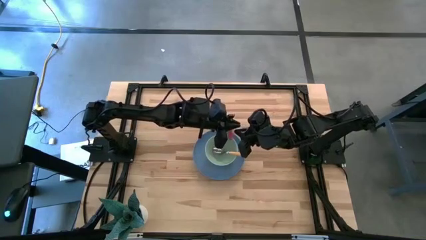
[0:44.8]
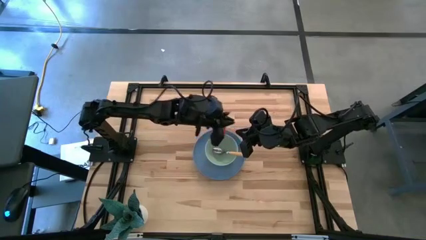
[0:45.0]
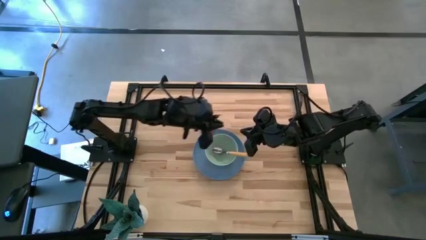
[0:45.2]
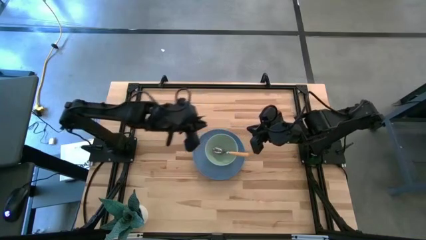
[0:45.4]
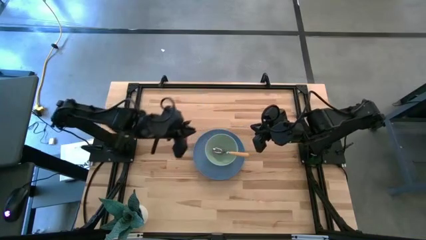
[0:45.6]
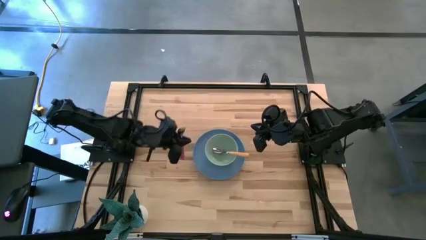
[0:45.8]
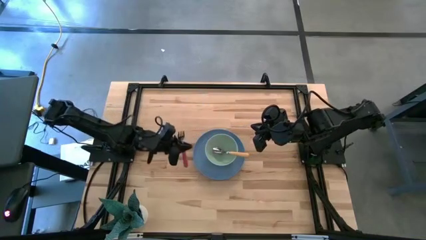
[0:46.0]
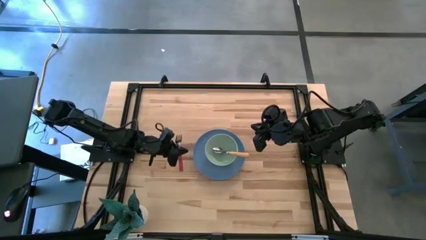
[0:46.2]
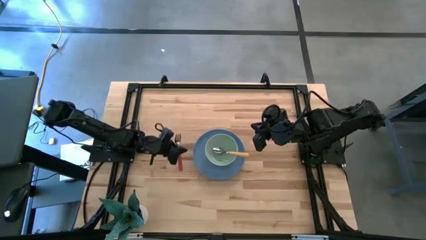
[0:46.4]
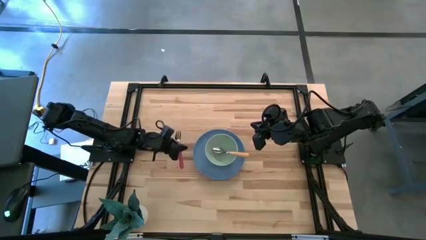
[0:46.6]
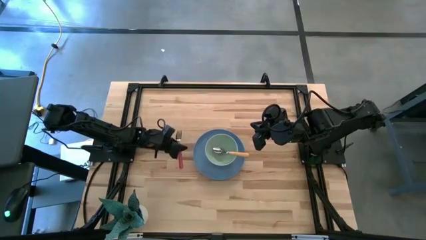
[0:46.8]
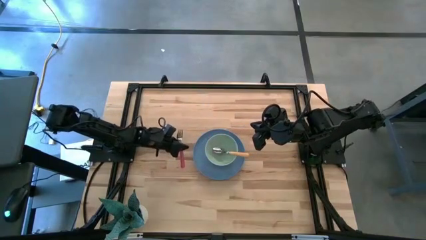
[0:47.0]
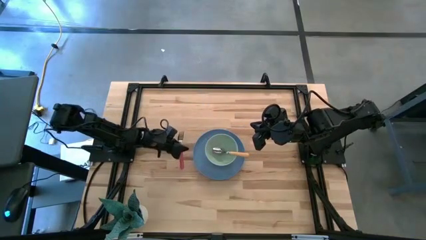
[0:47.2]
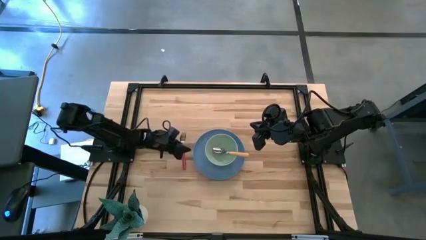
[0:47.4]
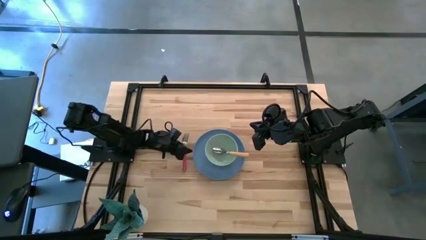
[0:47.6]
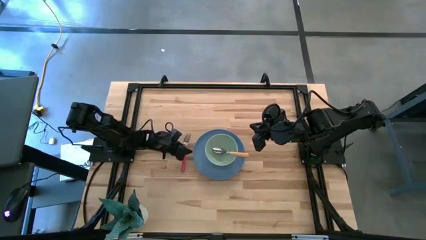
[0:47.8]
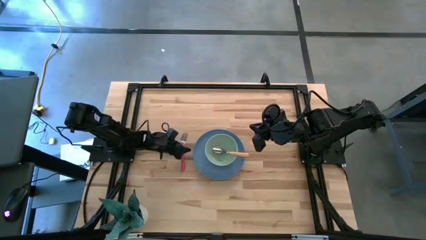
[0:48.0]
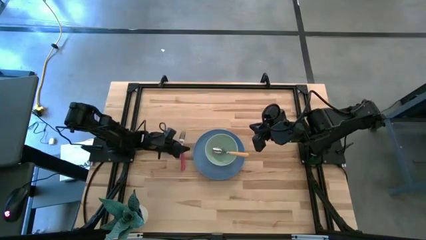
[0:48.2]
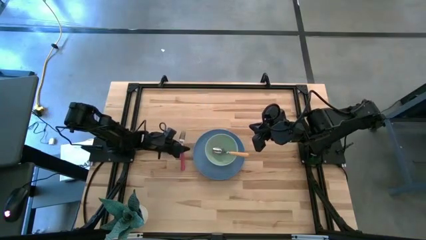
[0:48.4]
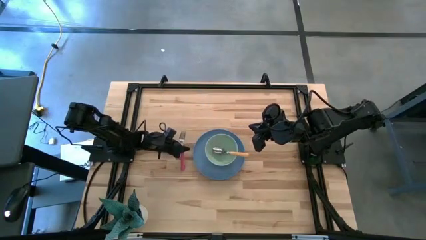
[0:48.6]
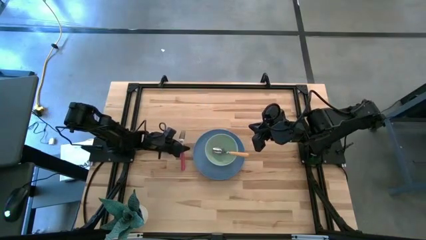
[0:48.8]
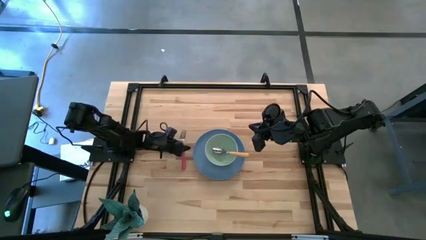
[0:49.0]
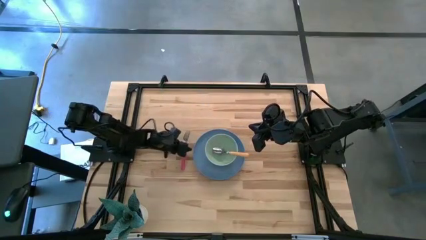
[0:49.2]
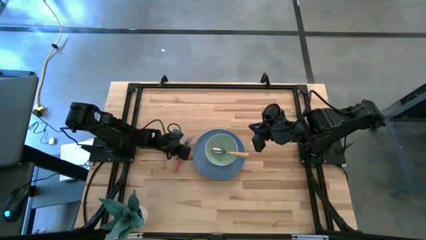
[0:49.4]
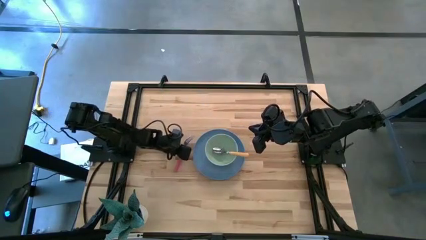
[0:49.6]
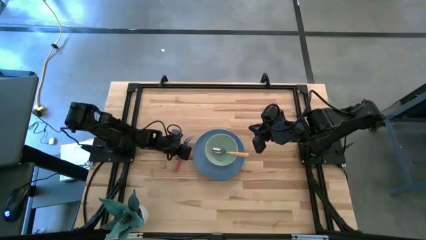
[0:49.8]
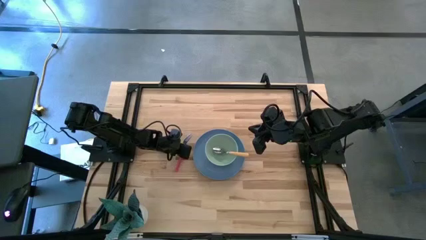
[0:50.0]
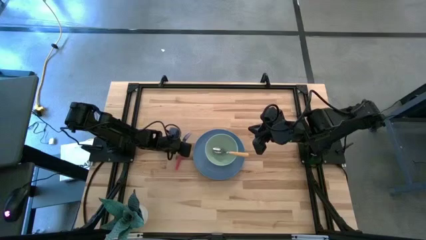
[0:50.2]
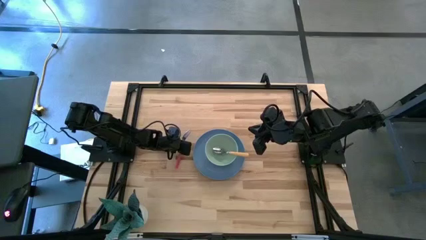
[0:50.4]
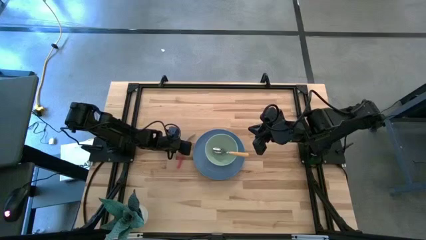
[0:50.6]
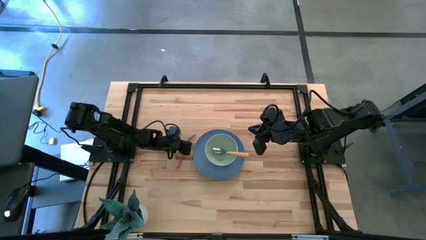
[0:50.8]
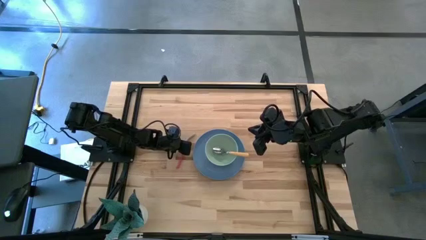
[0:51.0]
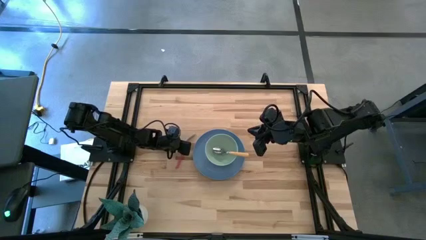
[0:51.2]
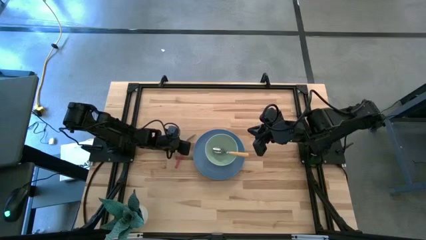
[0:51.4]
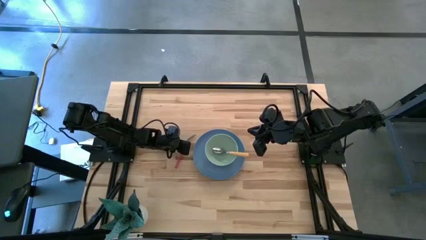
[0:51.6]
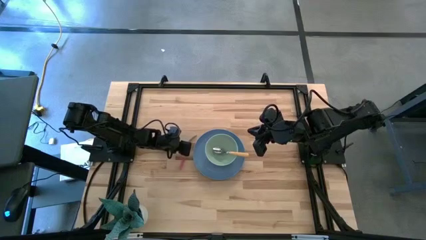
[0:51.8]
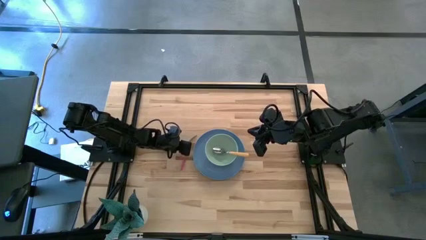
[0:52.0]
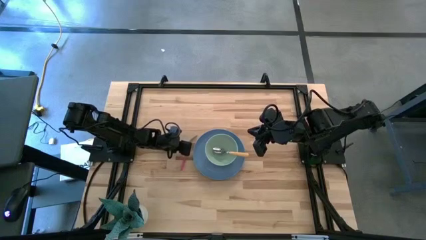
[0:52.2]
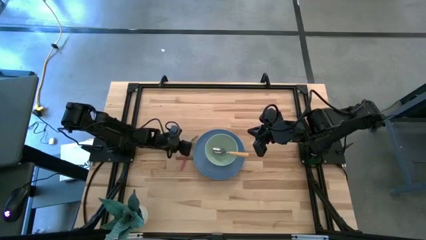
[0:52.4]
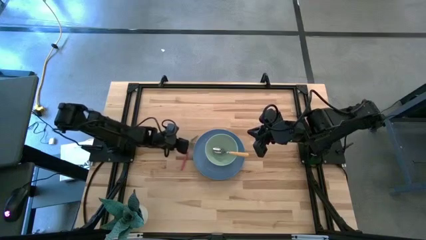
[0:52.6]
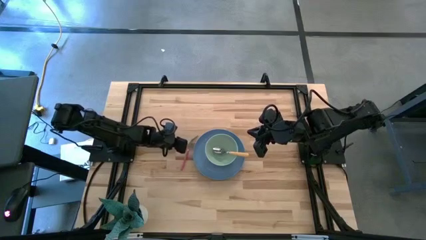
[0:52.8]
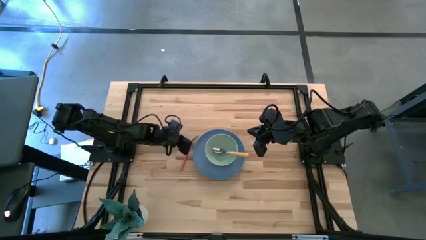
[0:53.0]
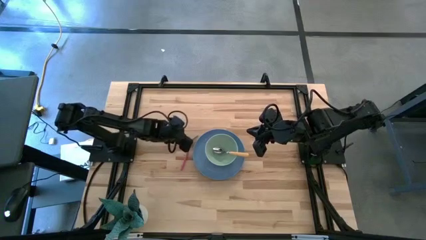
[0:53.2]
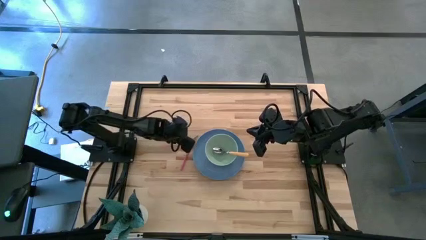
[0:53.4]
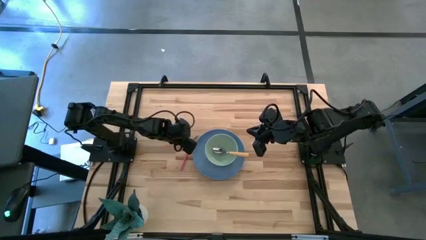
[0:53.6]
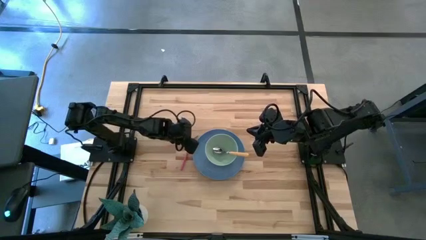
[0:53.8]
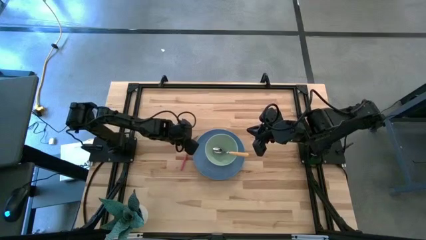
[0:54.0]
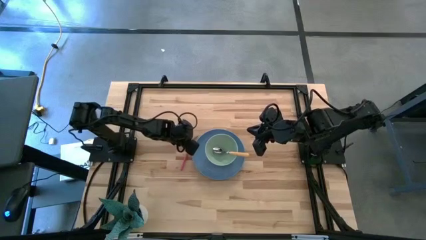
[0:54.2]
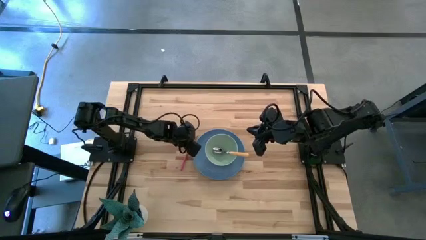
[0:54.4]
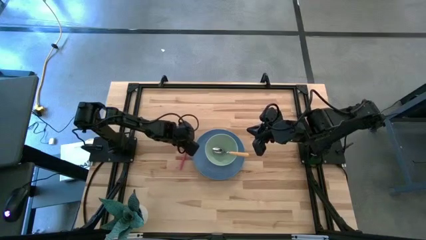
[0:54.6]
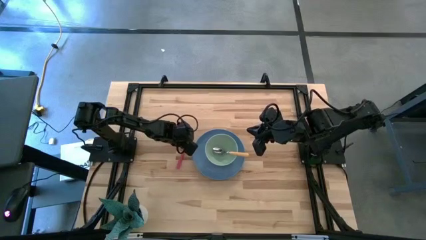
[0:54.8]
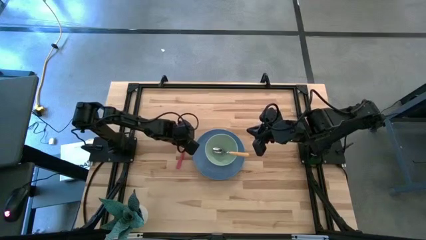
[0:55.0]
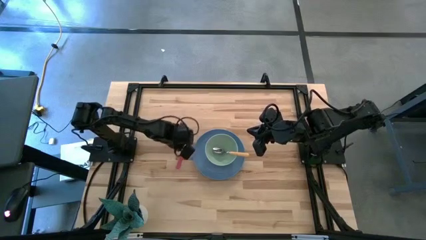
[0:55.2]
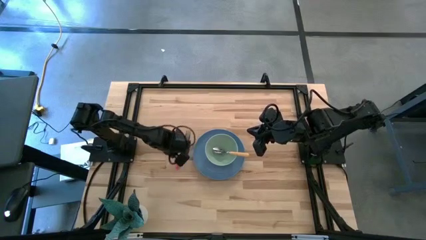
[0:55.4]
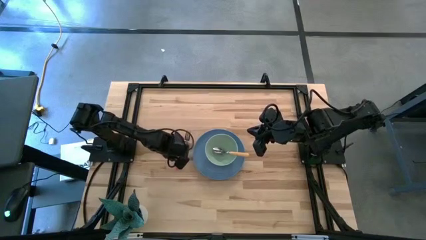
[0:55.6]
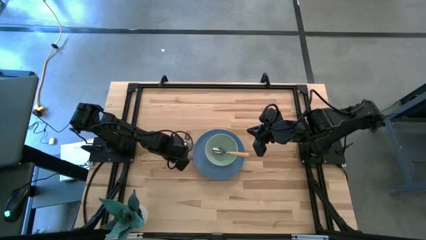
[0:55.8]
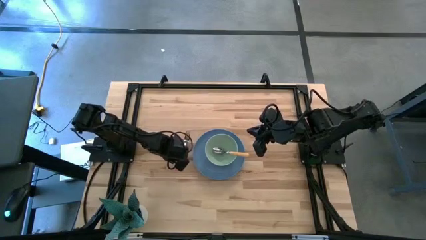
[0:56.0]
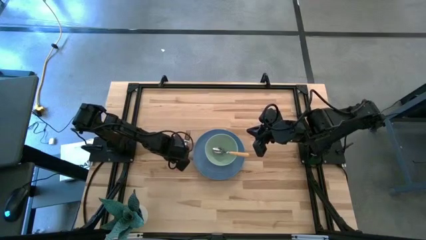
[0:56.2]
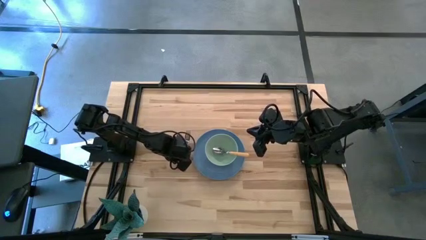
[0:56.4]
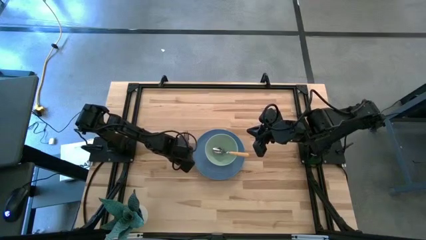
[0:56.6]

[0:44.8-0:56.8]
Task: Set table place
Move the red fork to the left of the blue plate

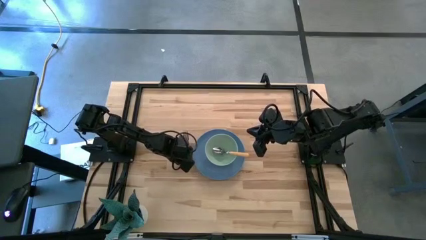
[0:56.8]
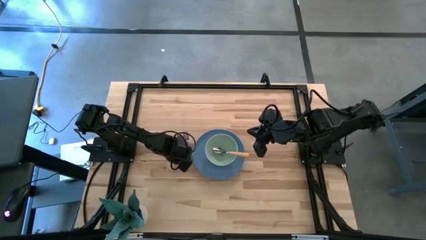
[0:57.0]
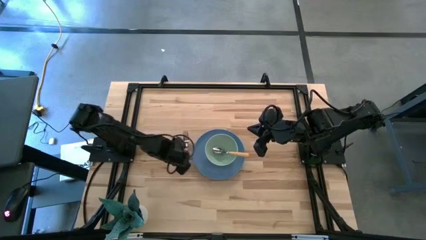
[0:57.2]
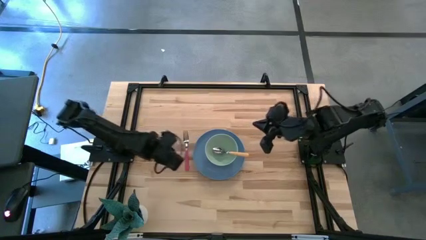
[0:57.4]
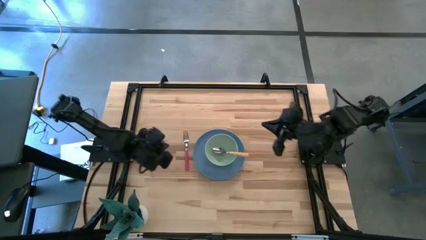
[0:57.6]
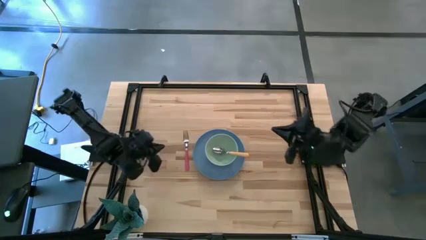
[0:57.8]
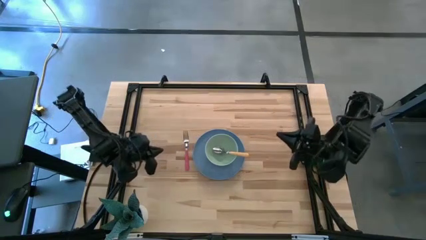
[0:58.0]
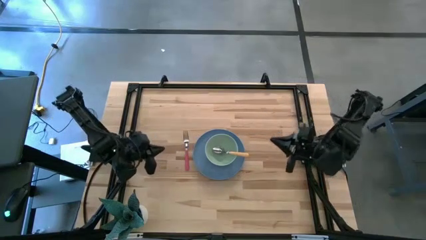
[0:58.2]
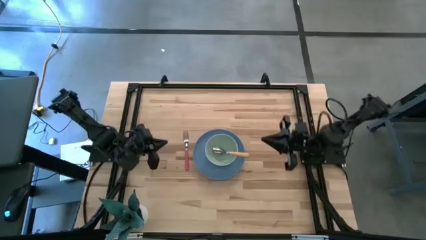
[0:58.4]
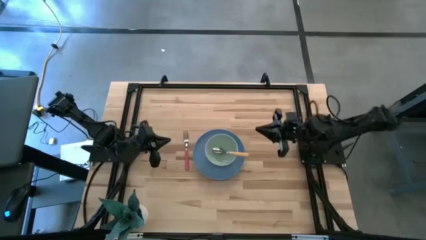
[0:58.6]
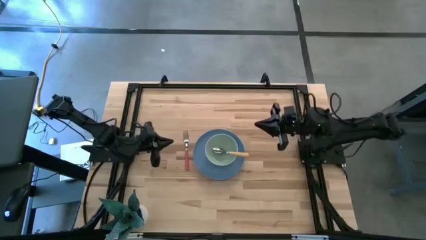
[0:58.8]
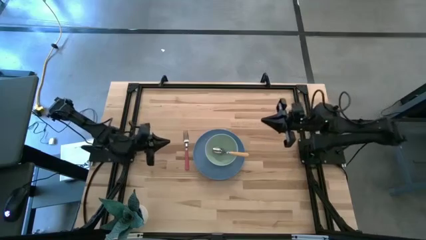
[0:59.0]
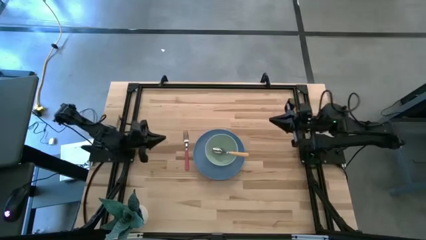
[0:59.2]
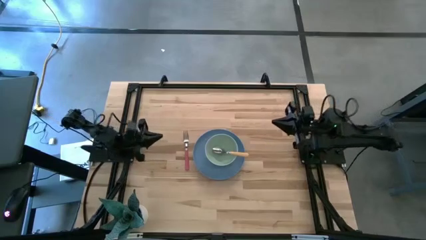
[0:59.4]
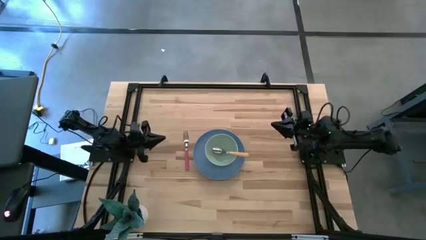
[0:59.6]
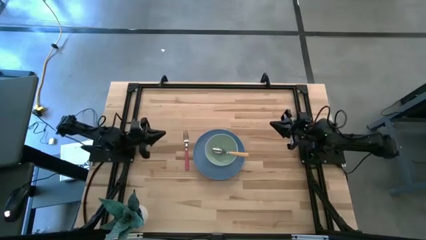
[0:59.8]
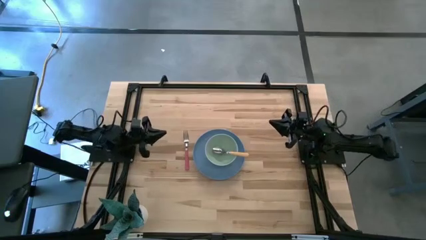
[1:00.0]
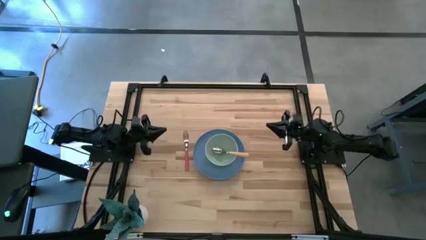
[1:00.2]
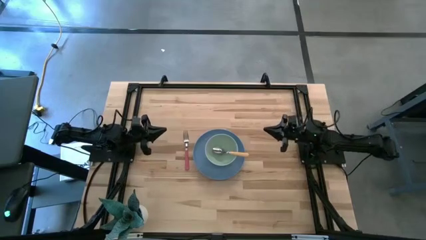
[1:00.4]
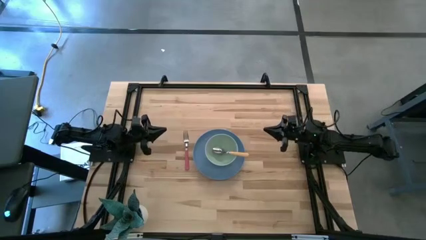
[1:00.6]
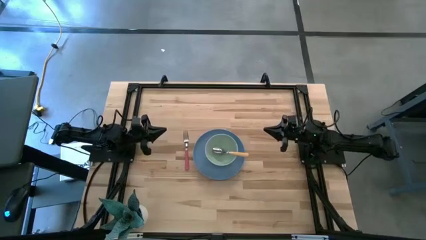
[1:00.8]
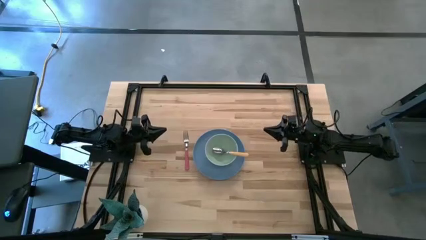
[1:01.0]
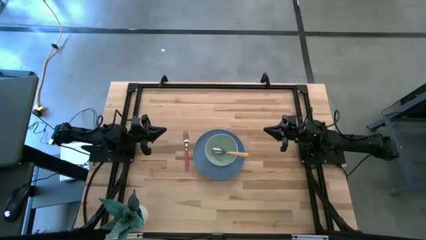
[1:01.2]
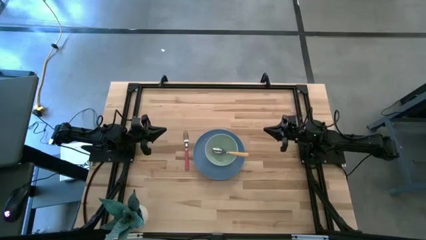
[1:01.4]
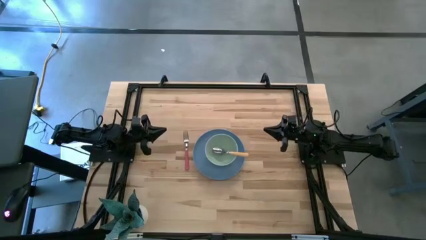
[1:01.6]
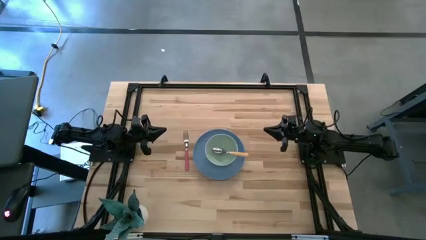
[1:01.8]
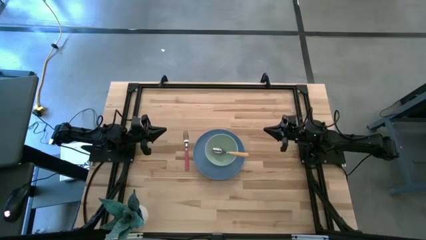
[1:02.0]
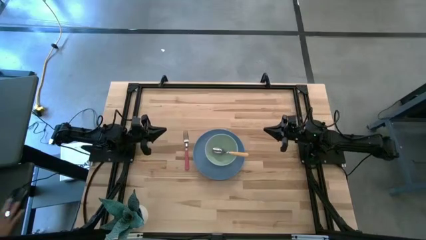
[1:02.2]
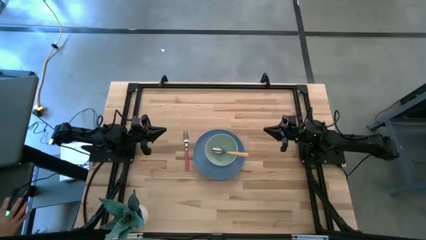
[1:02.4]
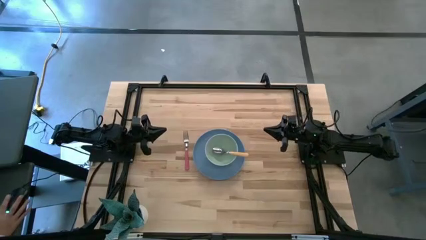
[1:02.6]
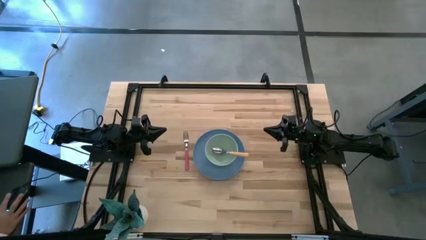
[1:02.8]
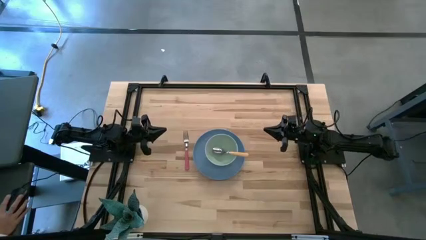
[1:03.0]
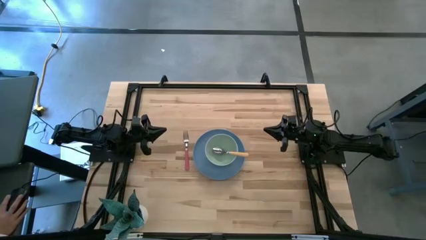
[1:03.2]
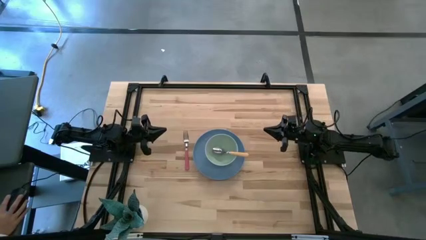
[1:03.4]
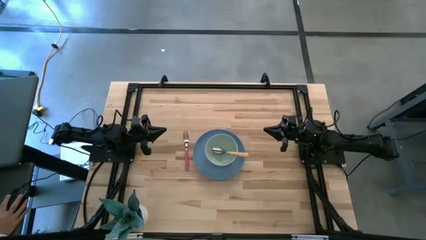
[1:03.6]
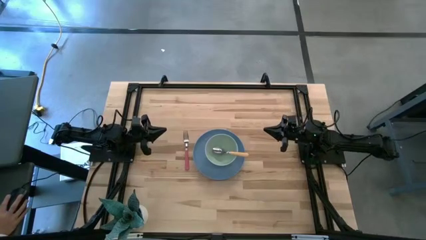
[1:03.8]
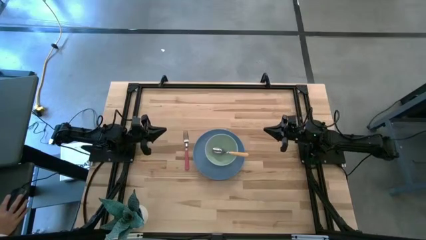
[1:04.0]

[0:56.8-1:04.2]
Return to Home Position
